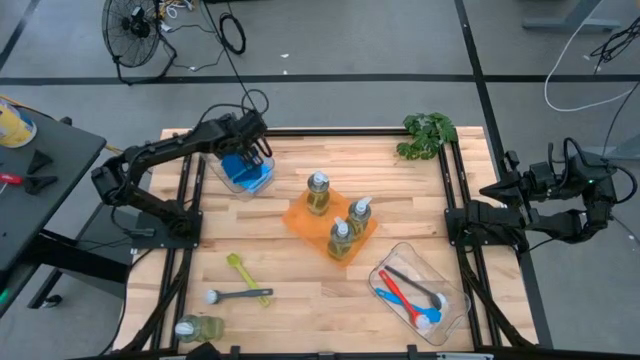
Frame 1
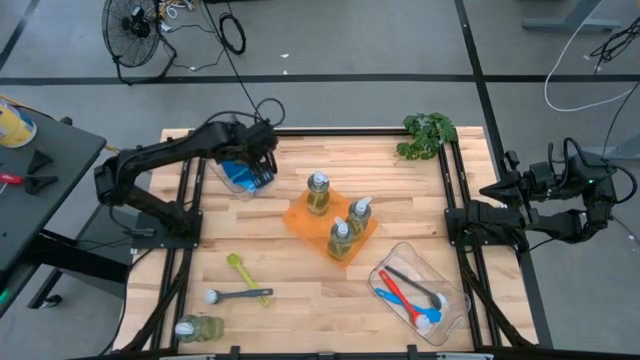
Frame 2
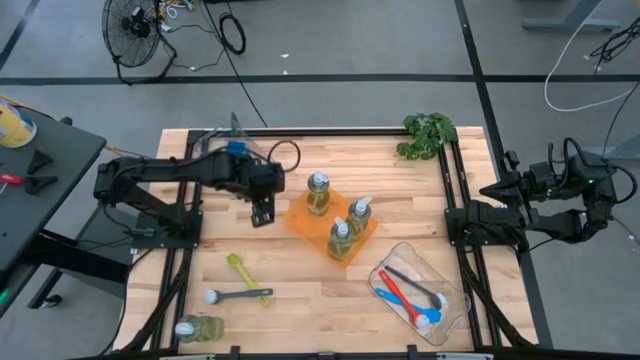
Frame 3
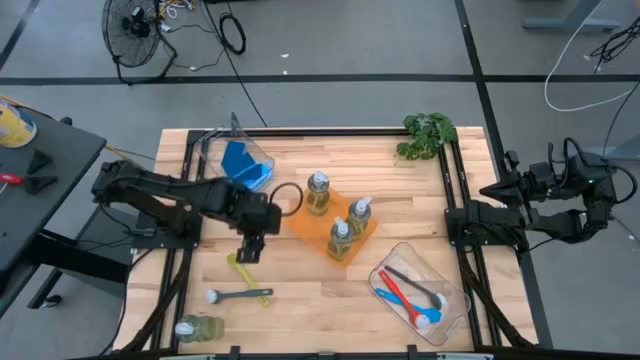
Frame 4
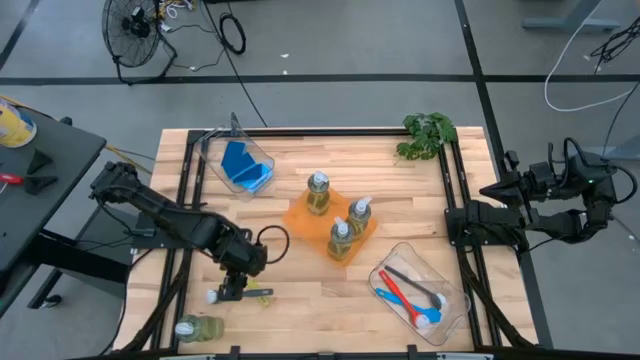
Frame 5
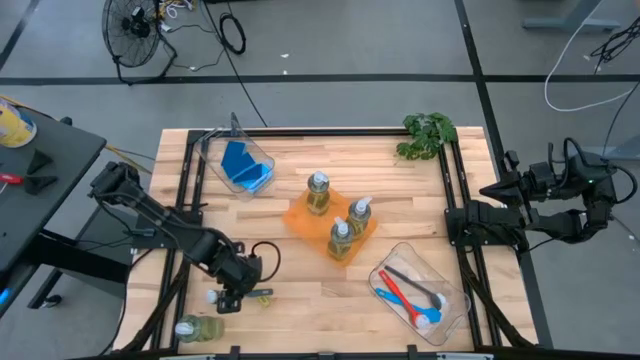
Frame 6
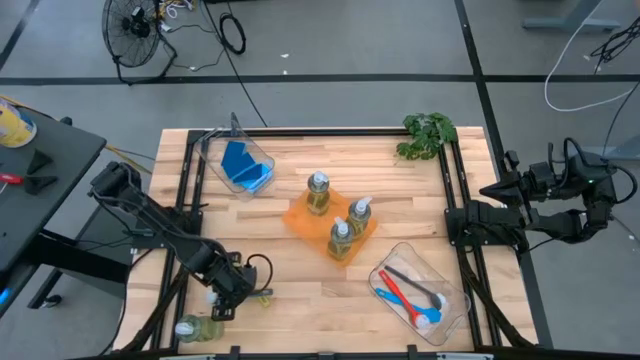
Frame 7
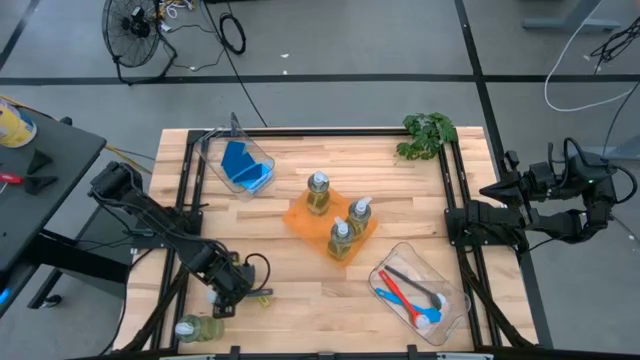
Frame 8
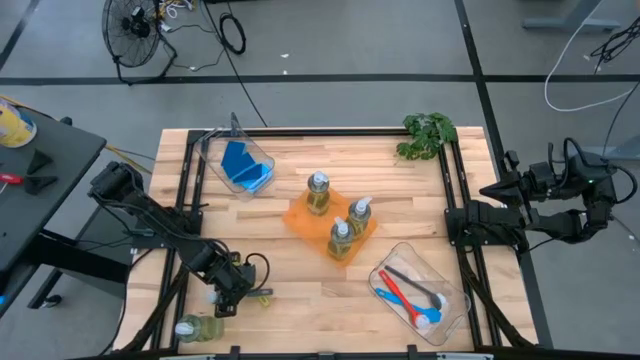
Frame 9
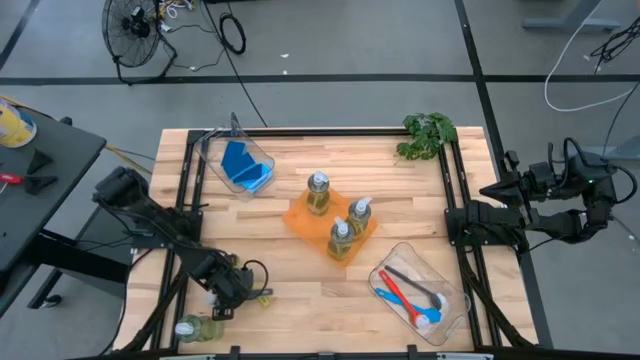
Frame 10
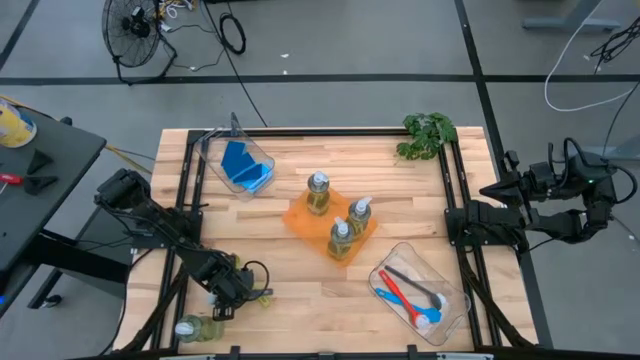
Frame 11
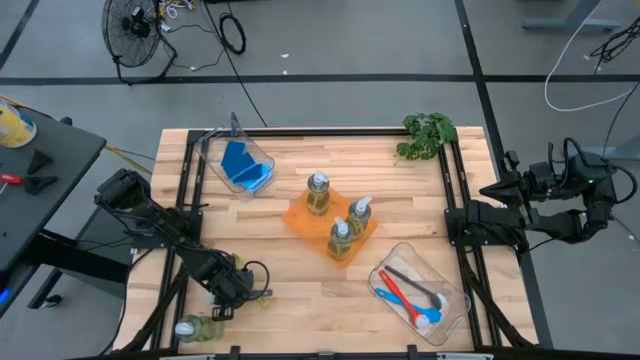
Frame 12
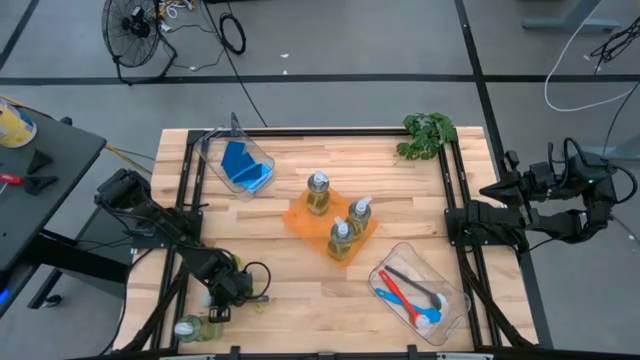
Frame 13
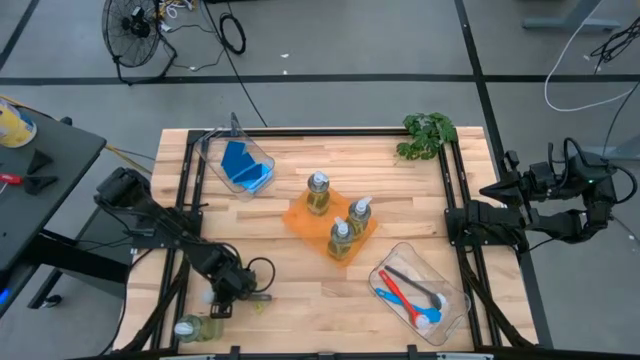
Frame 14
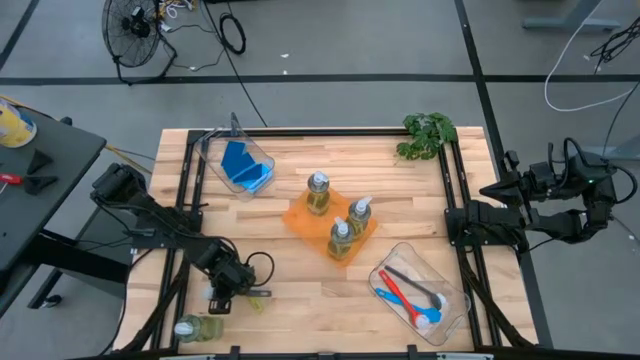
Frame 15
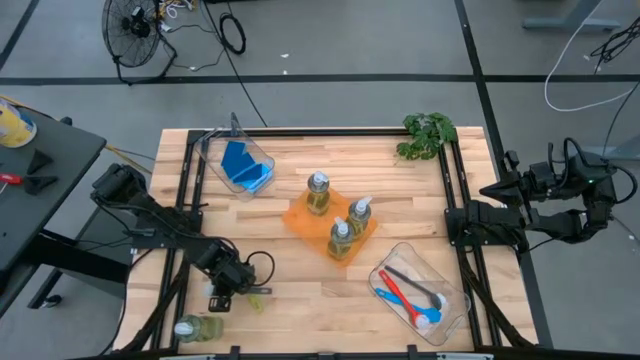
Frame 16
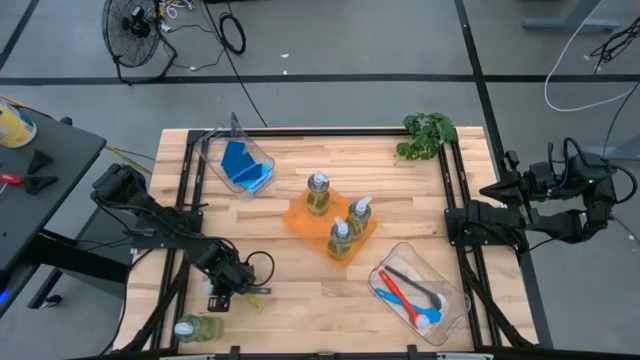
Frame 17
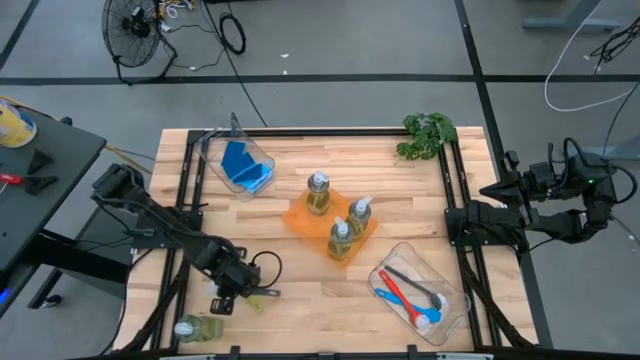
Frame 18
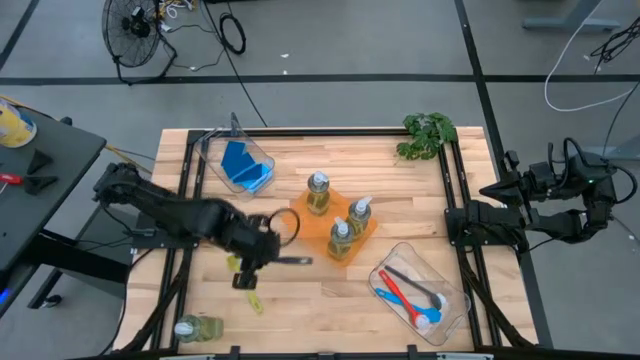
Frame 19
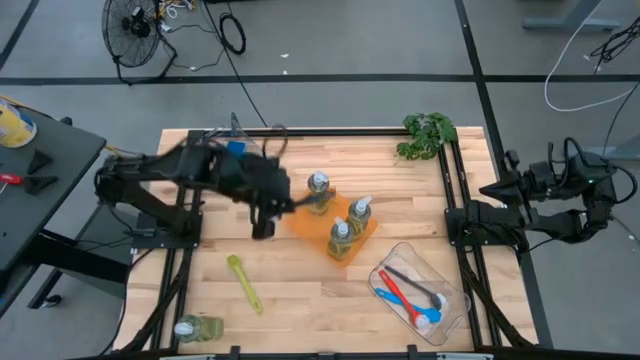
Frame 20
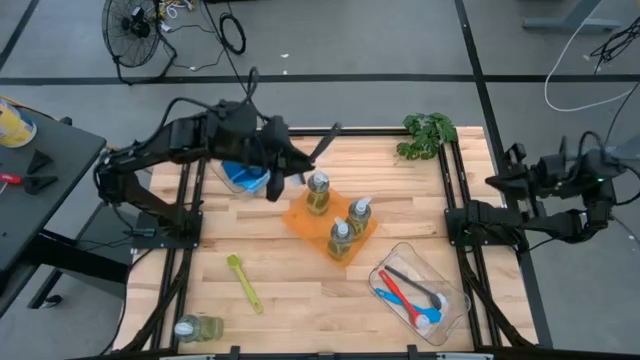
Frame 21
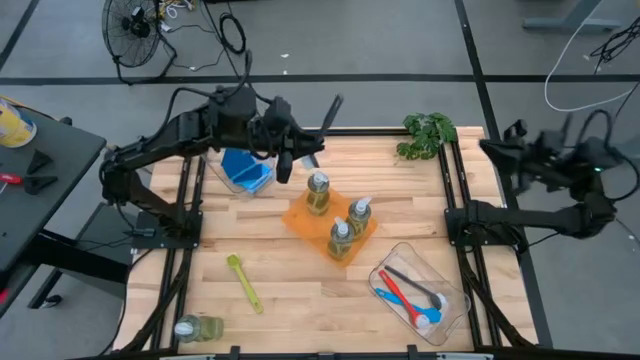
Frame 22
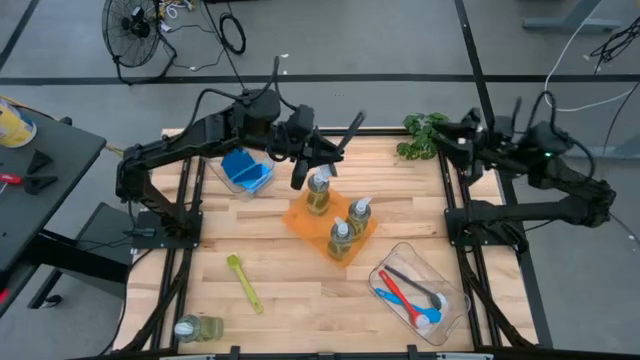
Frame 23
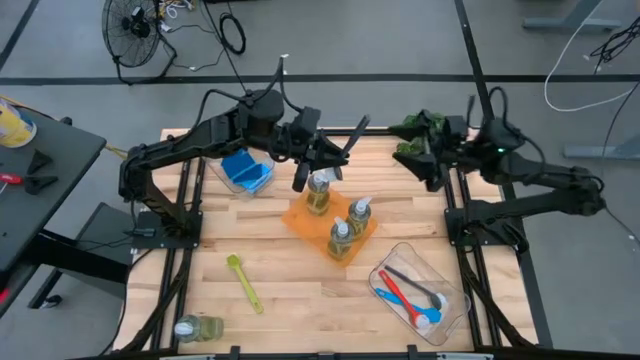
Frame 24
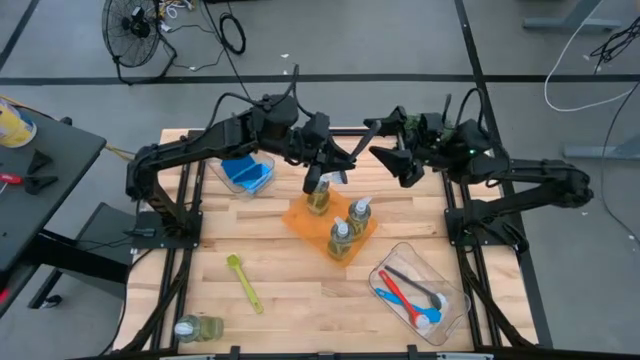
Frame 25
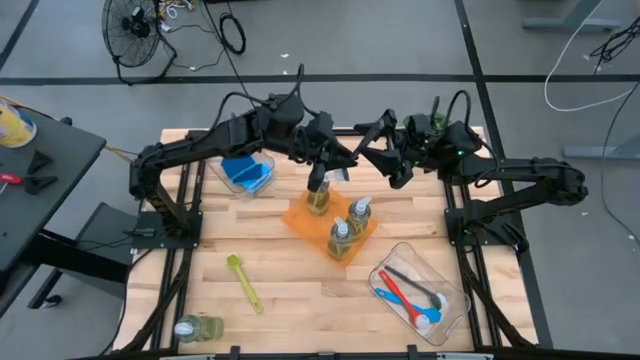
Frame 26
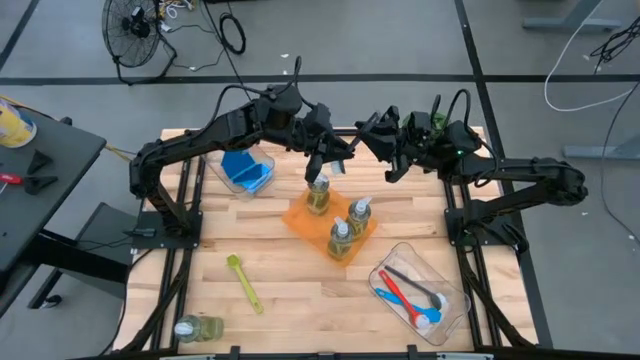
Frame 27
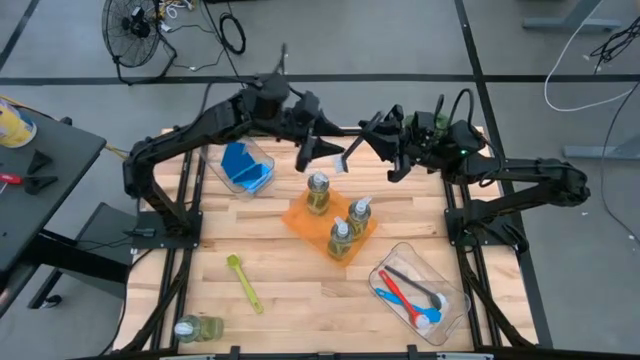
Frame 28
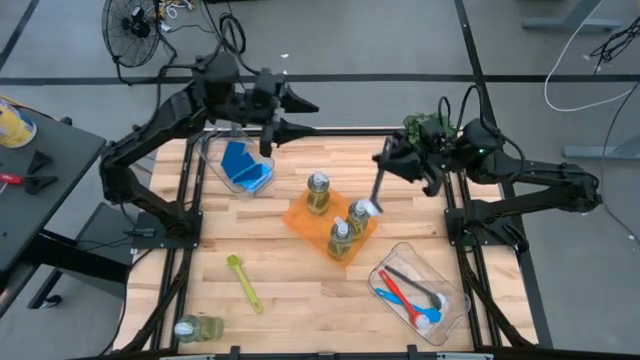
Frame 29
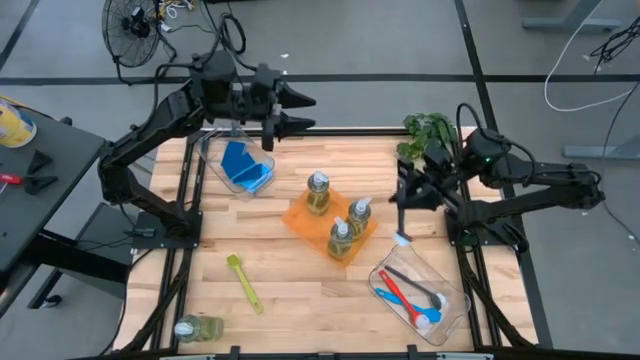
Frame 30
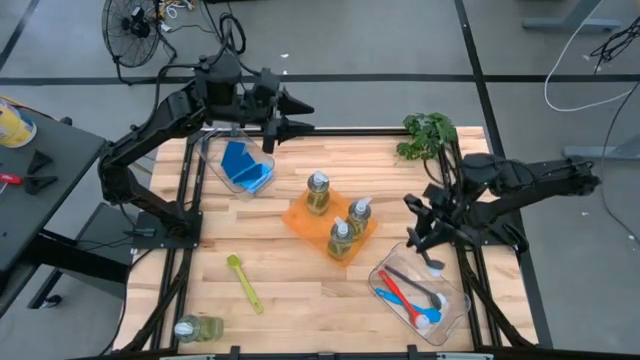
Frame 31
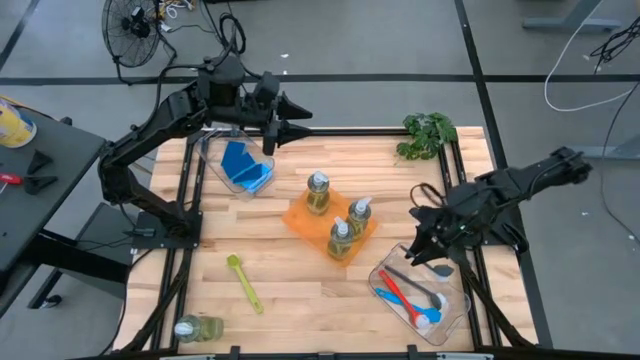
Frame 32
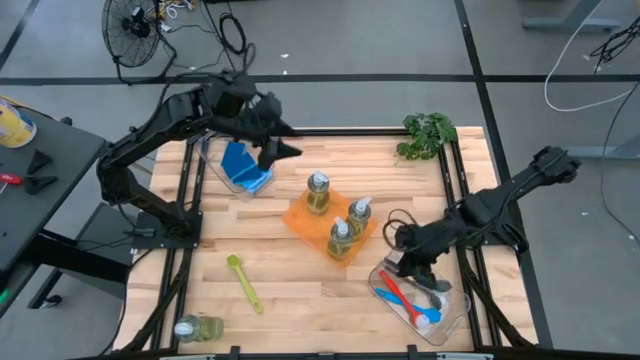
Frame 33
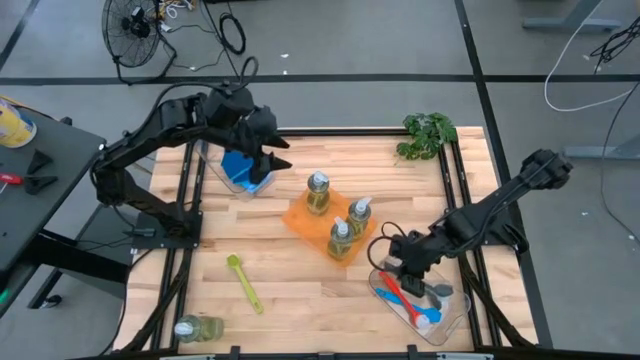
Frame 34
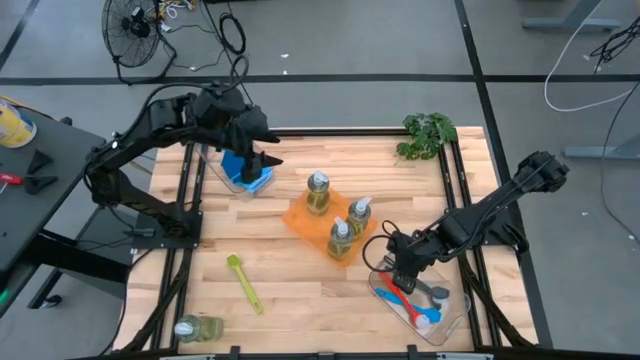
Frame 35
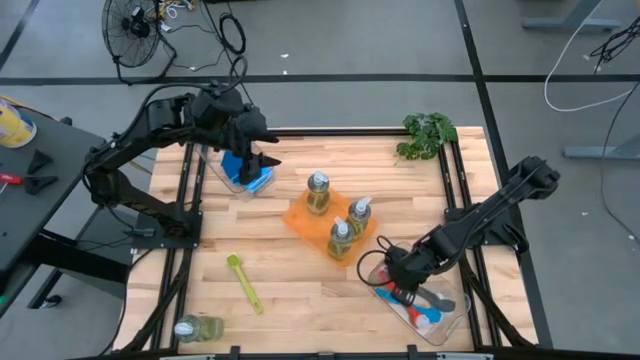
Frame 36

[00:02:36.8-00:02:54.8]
Task: Pick & Place Kitchen Sink Supplies
Put the gray dish brush into the bottom transparent bin

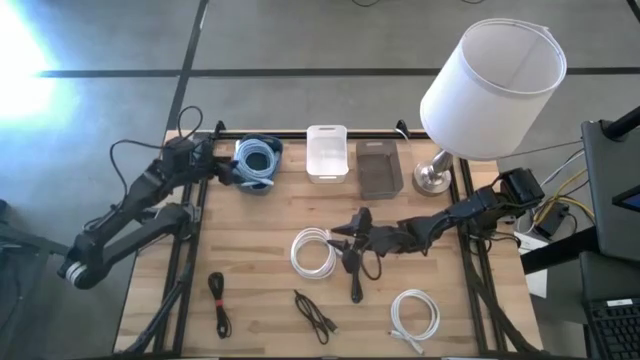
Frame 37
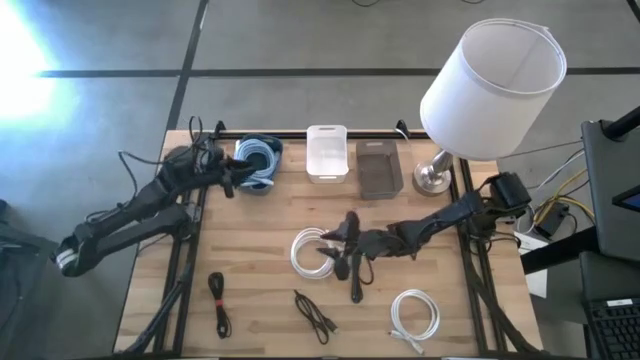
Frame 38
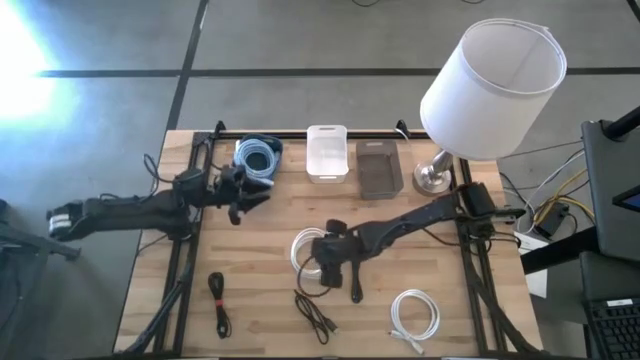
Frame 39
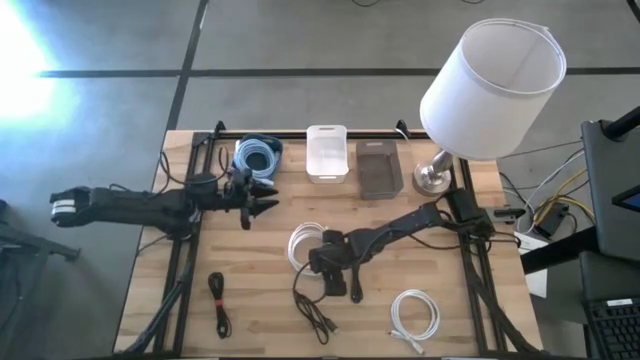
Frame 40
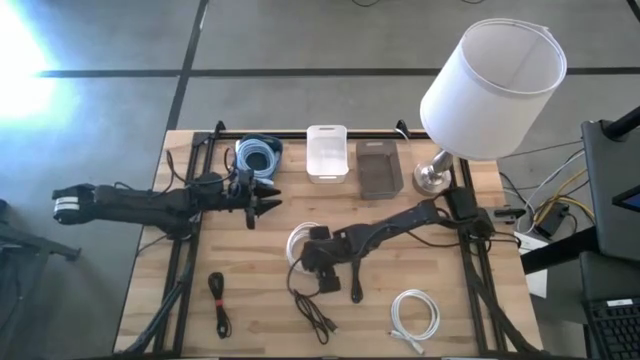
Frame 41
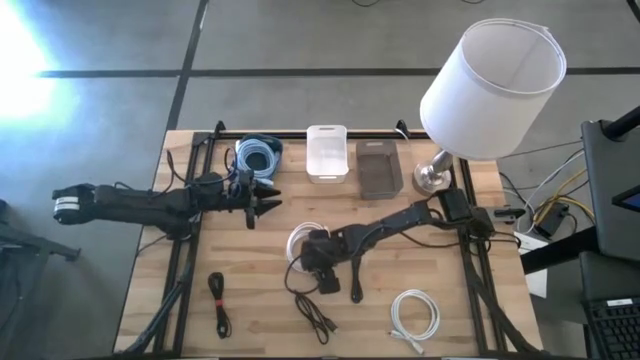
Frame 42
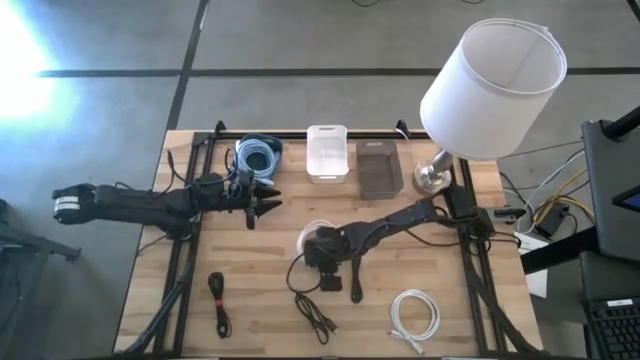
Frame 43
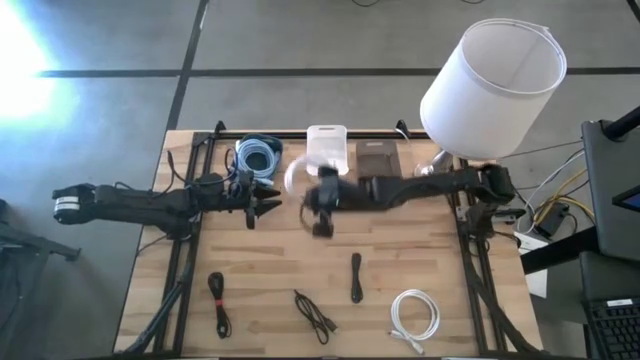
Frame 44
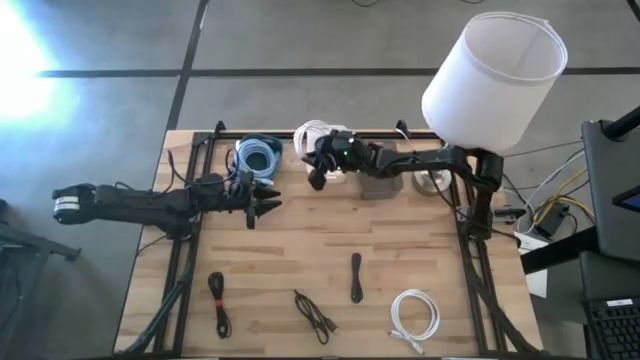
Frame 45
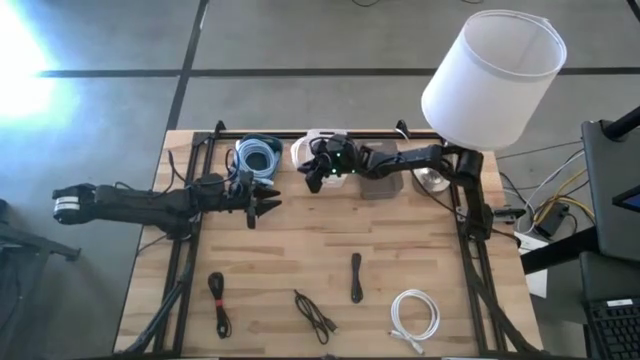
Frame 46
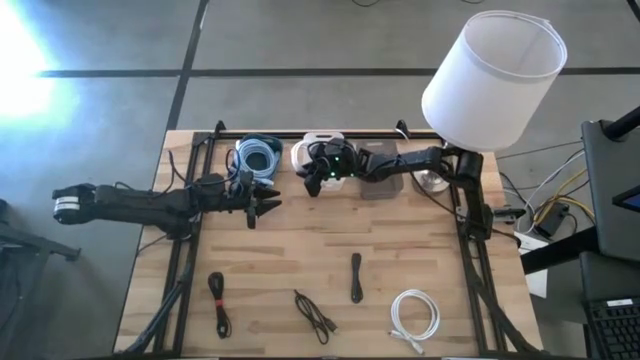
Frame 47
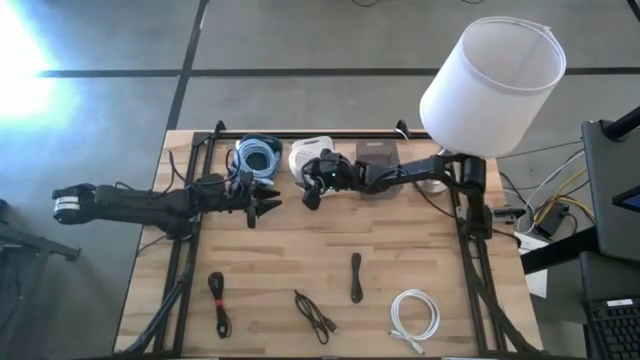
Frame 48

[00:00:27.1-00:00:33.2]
Task: Pick & Place USB Port
Put the top white HDMI cable into the white bin
